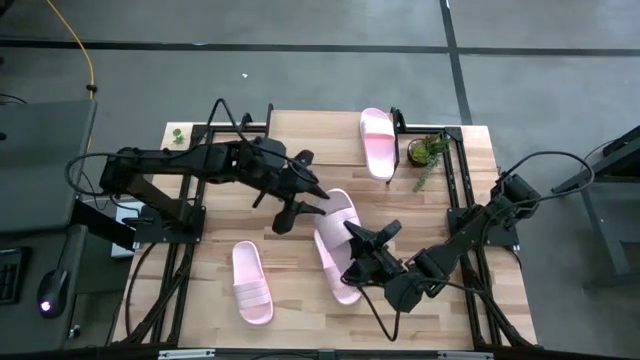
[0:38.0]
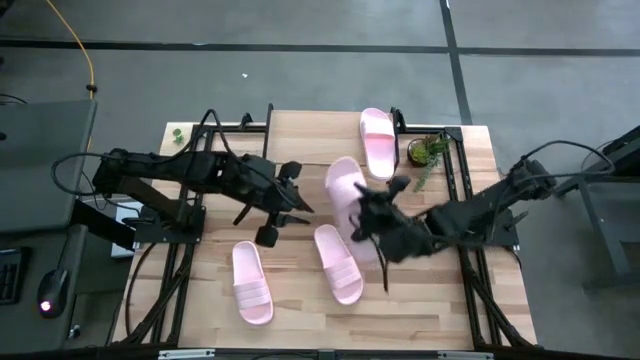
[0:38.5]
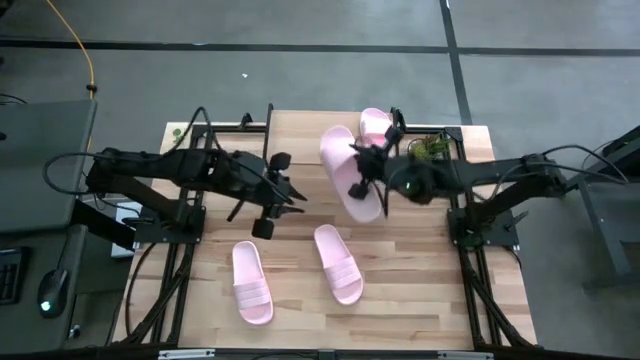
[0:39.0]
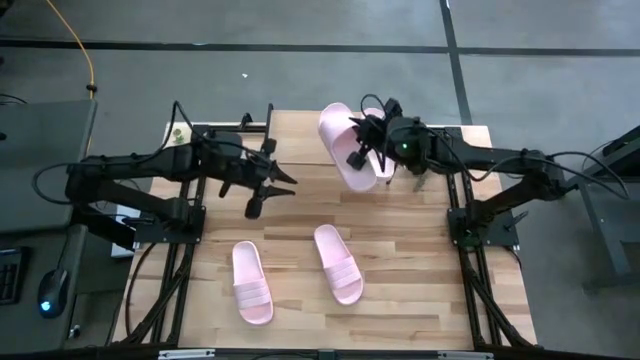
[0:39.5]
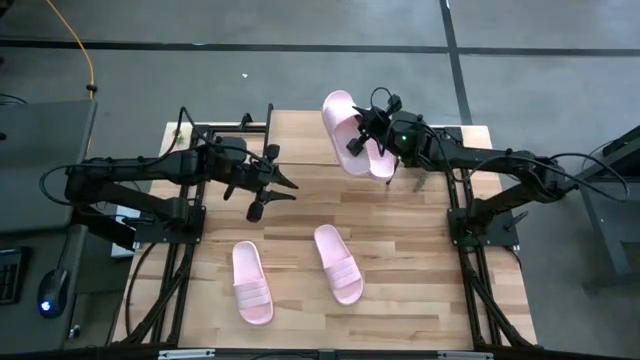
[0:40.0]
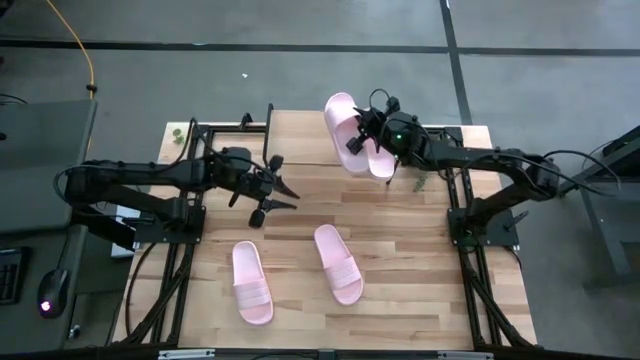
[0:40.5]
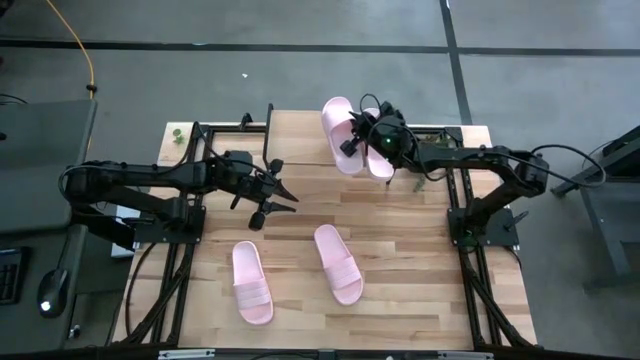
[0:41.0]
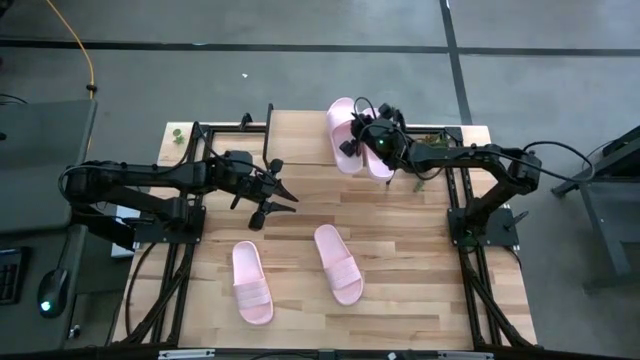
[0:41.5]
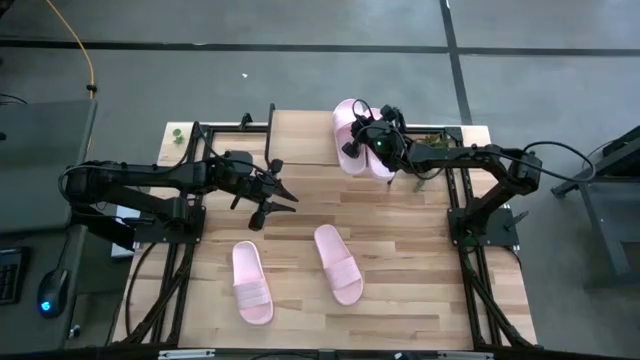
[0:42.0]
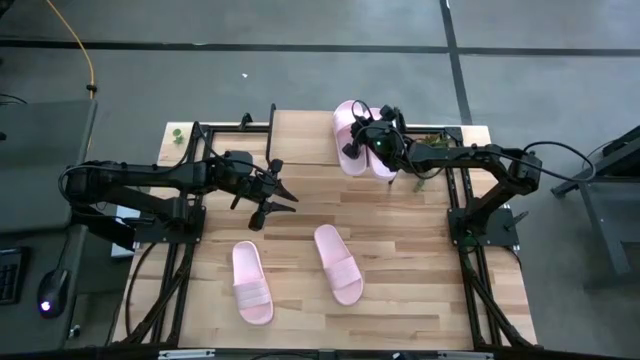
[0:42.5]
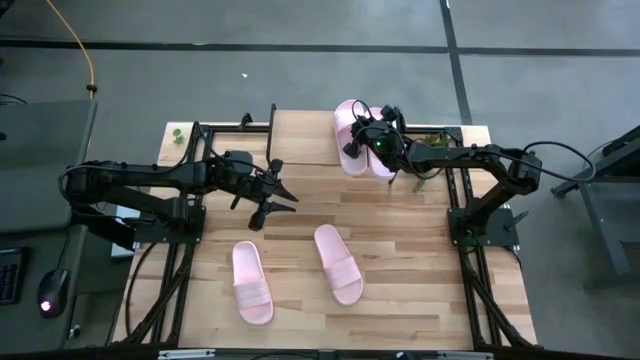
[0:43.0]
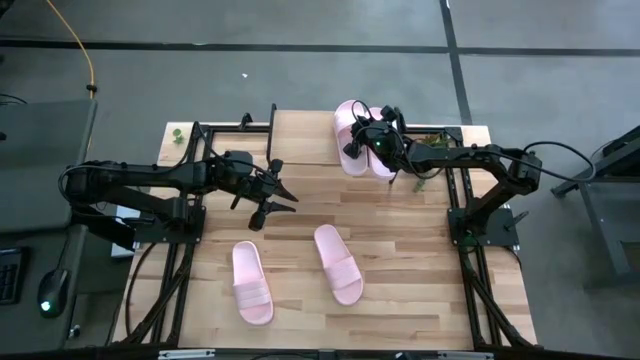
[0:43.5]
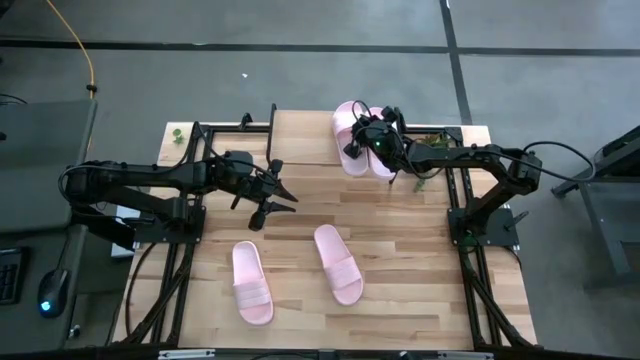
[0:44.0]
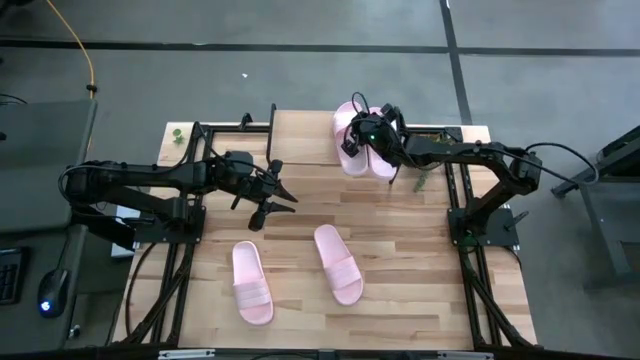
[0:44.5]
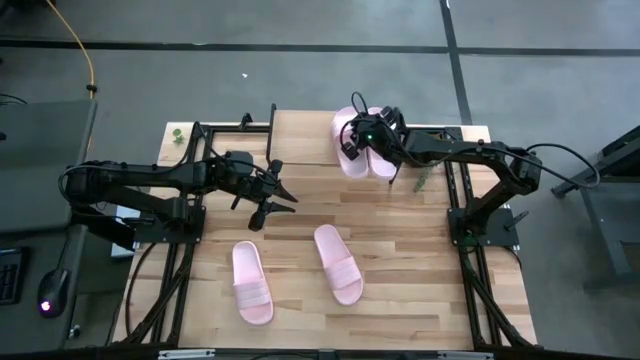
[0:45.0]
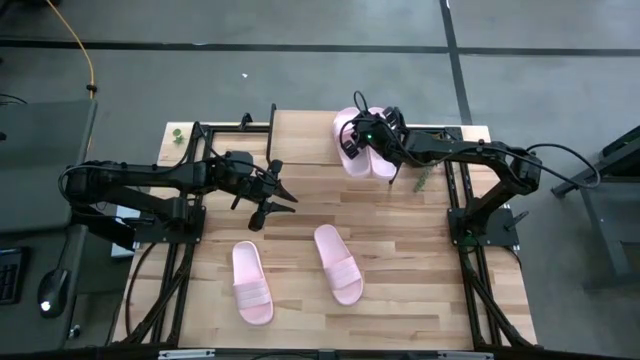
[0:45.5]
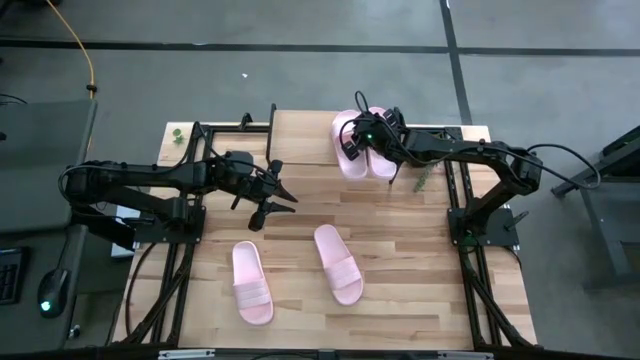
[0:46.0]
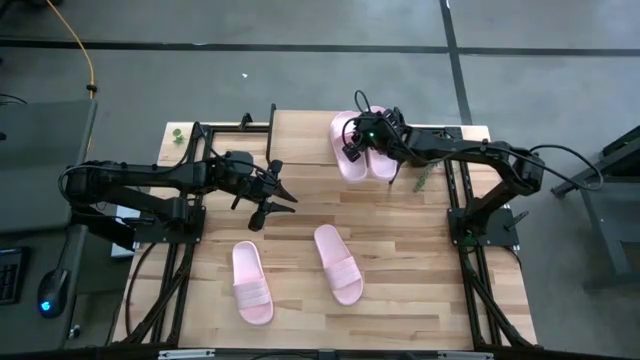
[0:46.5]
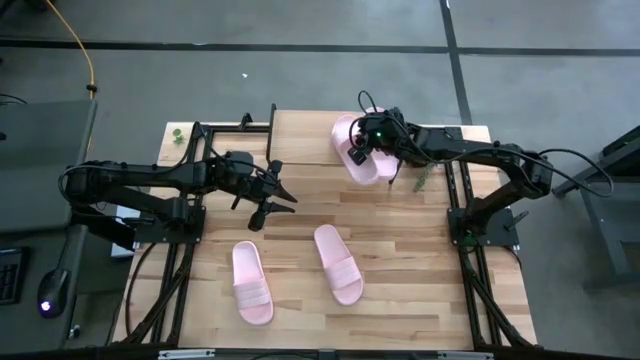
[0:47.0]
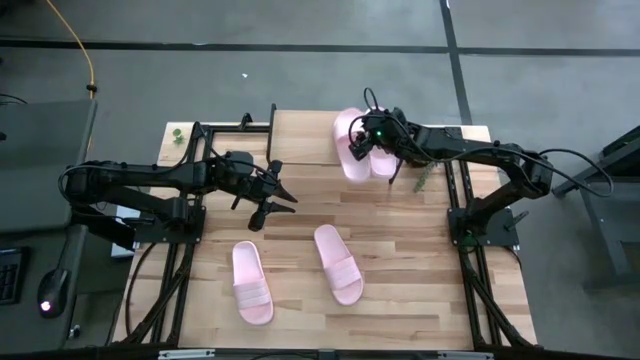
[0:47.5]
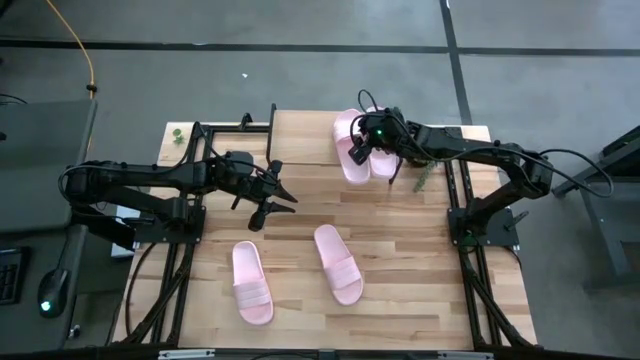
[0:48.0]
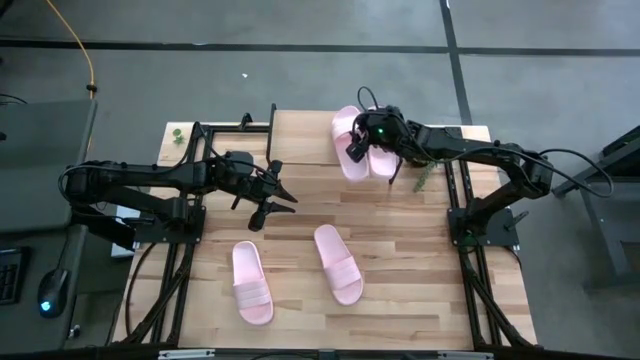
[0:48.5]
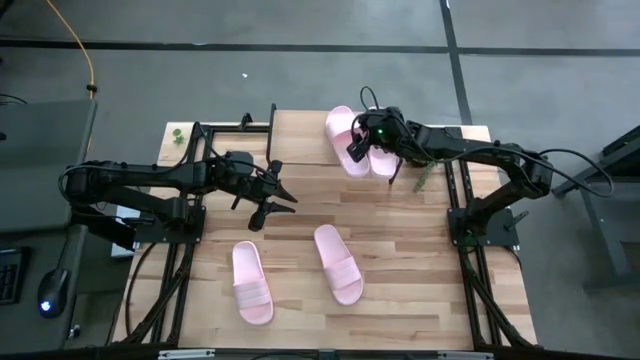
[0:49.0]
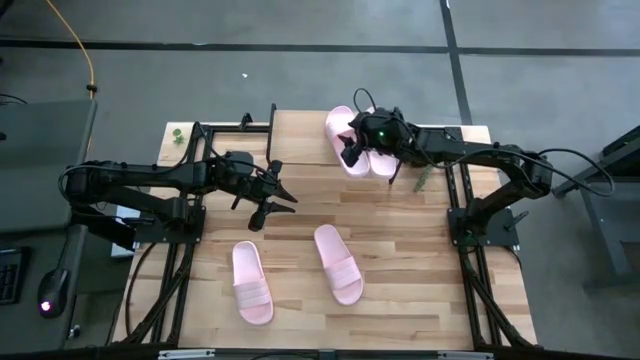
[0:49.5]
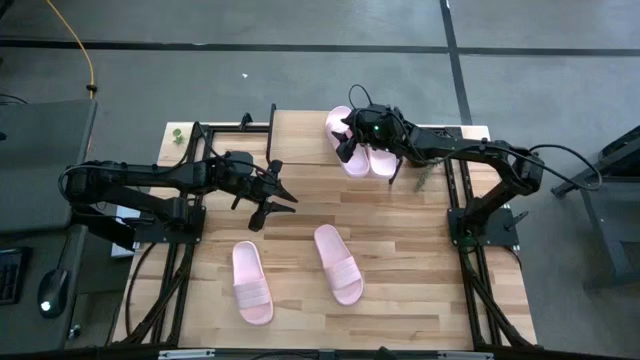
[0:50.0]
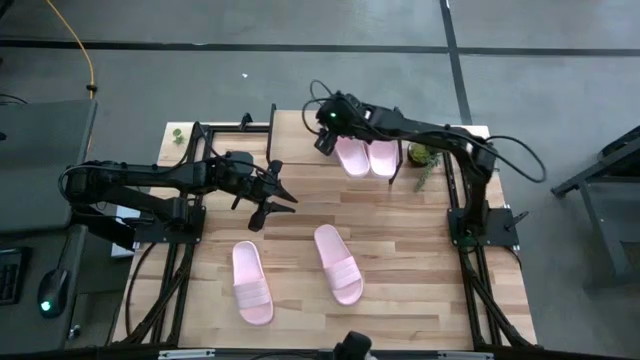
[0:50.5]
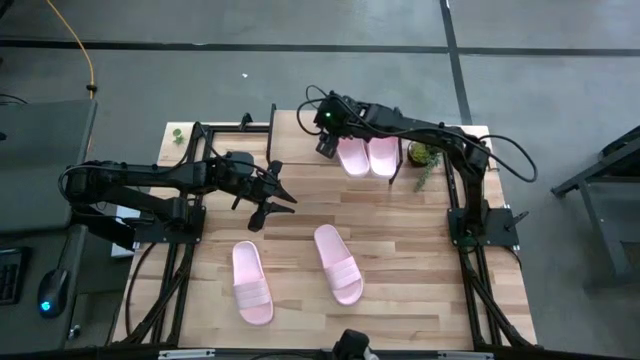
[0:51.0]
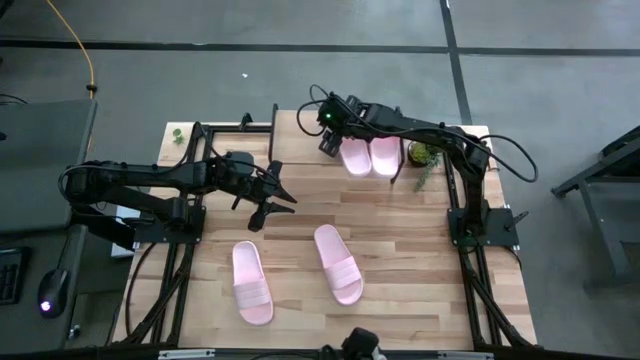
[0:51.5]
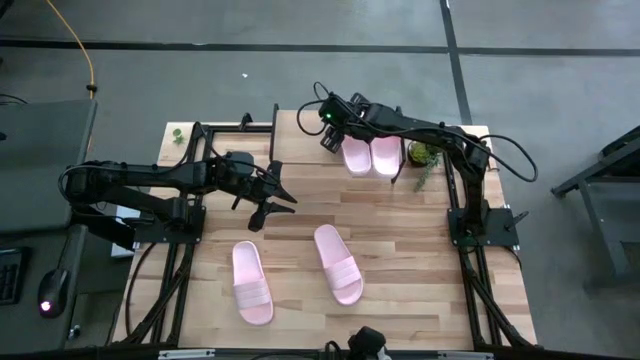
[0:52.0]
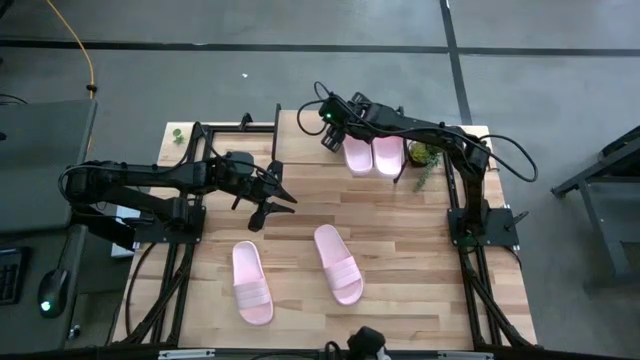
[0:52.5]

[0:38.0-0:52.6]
Task: Pick and place slides into the shelf
Put the pink slide on the shelf
